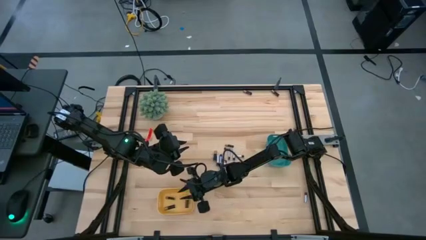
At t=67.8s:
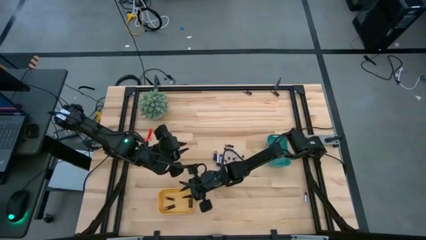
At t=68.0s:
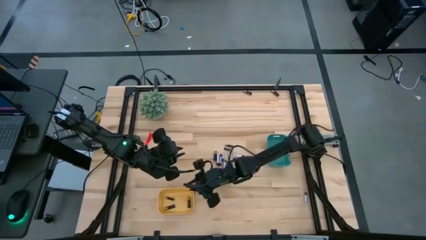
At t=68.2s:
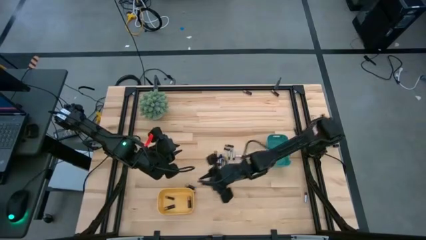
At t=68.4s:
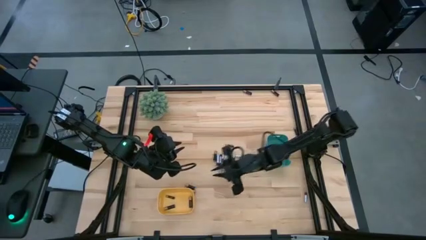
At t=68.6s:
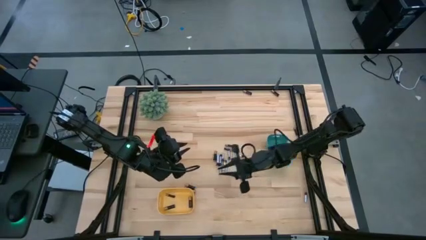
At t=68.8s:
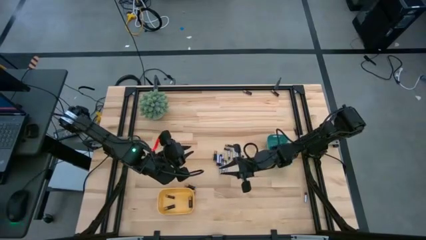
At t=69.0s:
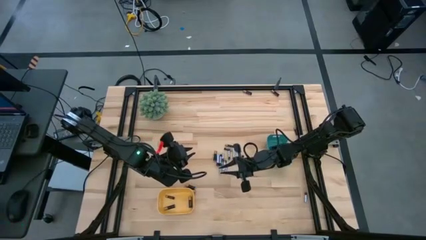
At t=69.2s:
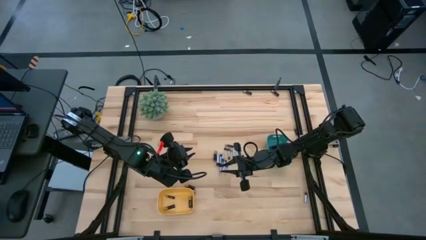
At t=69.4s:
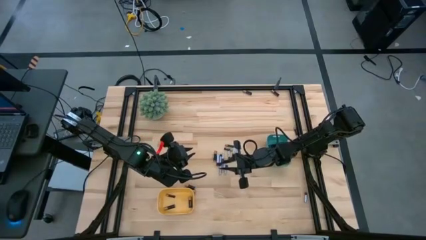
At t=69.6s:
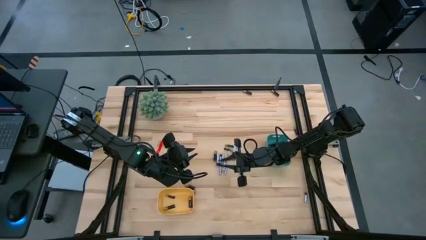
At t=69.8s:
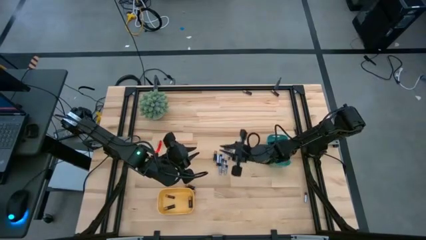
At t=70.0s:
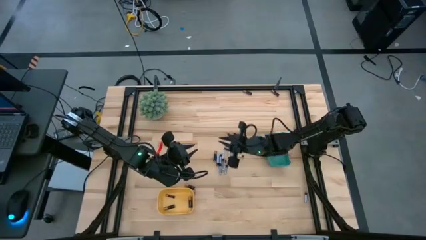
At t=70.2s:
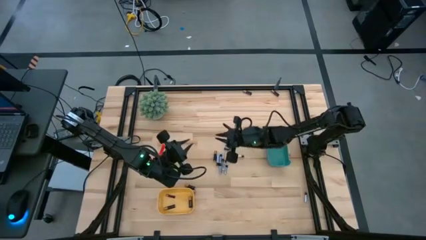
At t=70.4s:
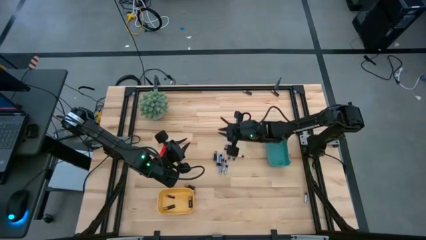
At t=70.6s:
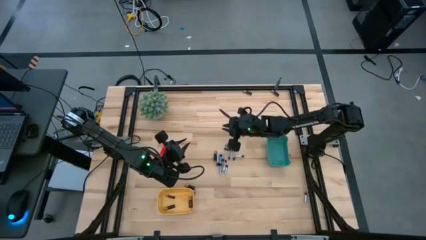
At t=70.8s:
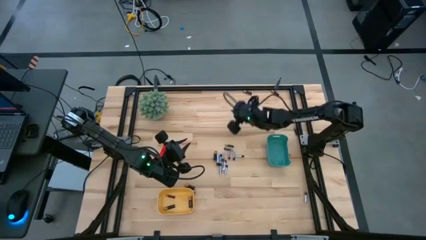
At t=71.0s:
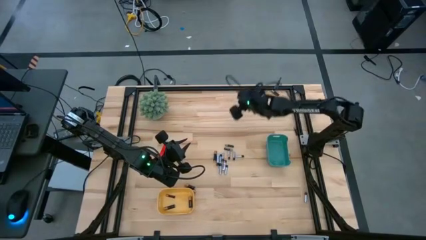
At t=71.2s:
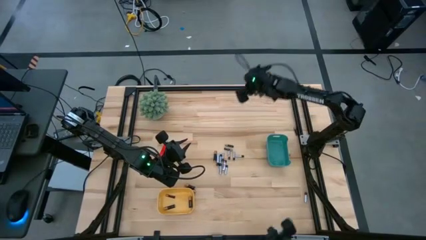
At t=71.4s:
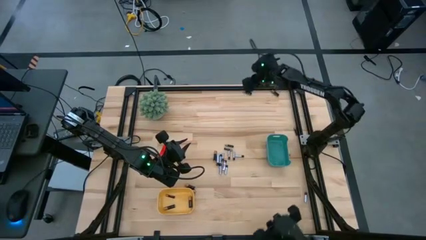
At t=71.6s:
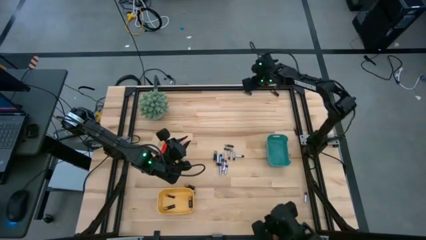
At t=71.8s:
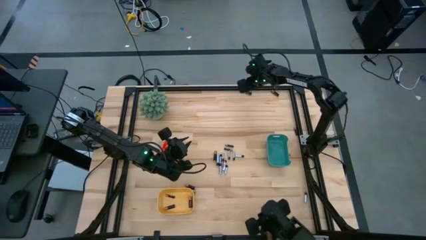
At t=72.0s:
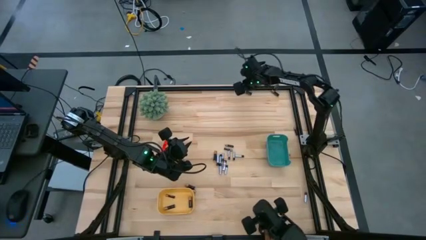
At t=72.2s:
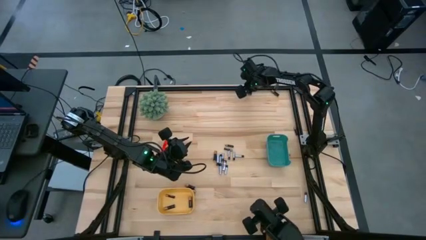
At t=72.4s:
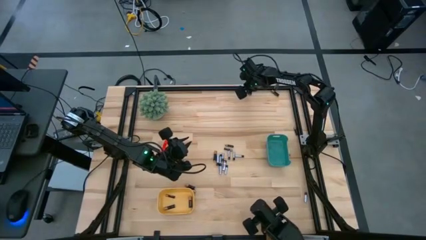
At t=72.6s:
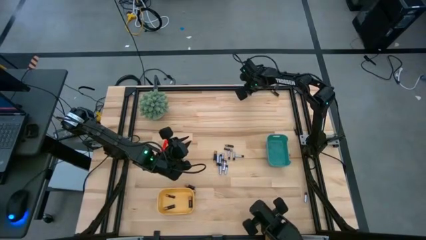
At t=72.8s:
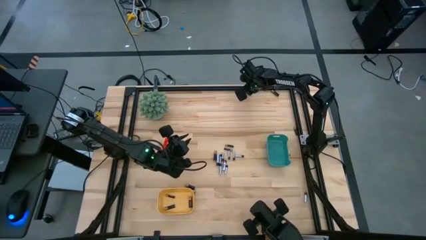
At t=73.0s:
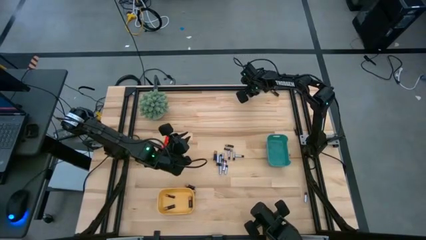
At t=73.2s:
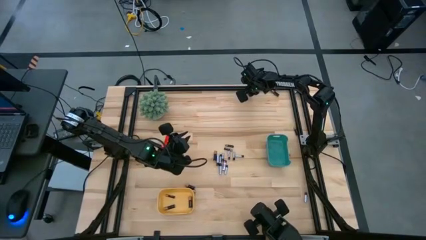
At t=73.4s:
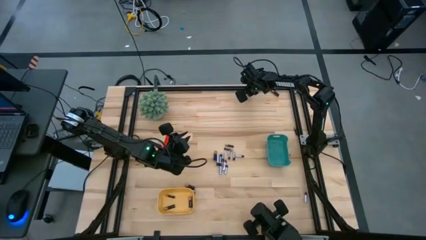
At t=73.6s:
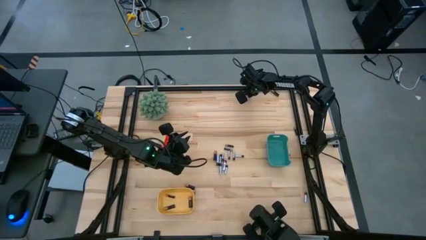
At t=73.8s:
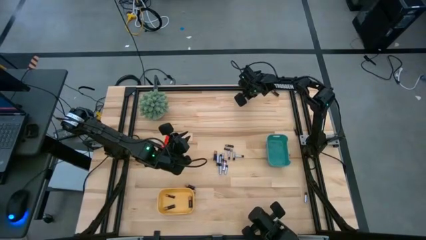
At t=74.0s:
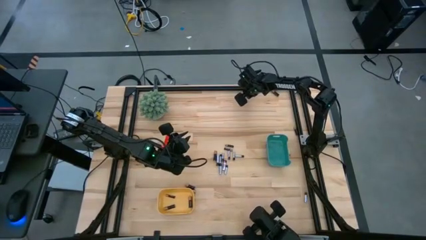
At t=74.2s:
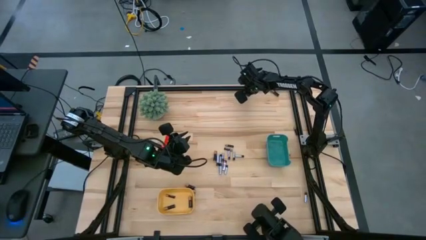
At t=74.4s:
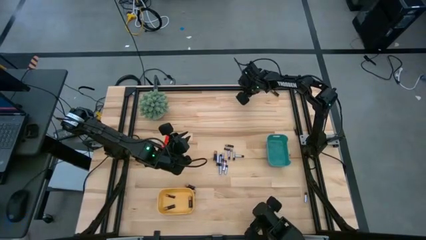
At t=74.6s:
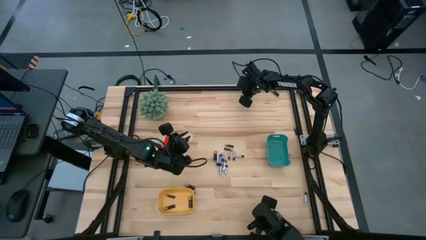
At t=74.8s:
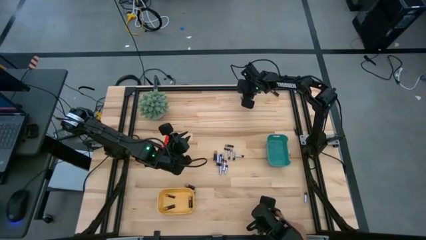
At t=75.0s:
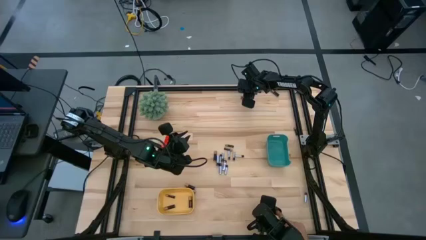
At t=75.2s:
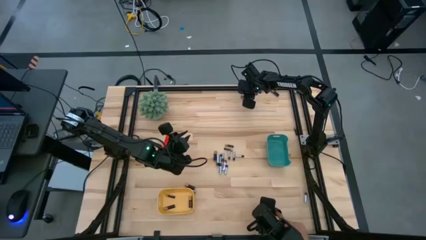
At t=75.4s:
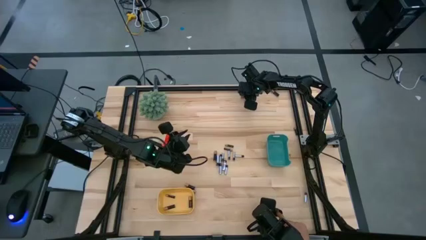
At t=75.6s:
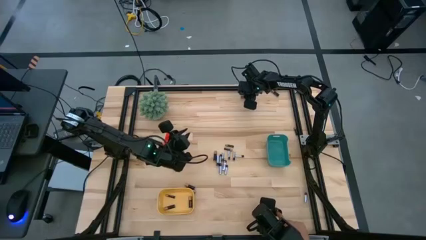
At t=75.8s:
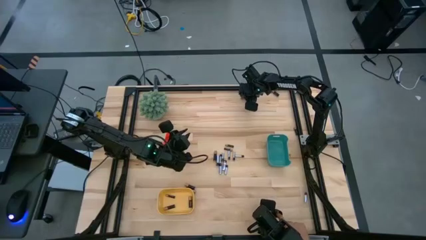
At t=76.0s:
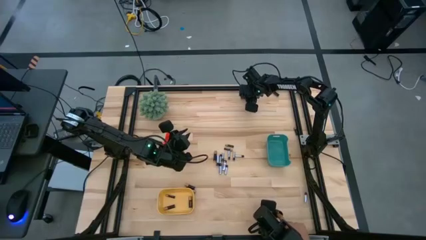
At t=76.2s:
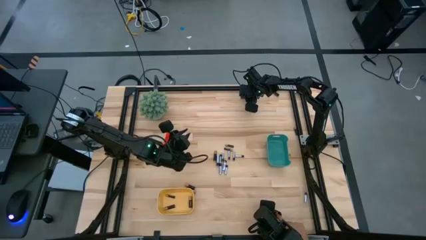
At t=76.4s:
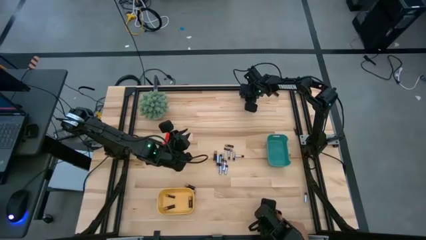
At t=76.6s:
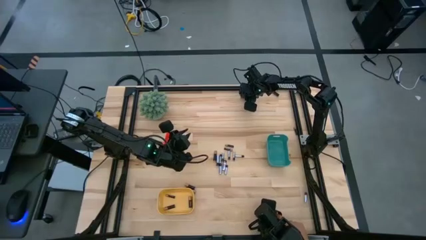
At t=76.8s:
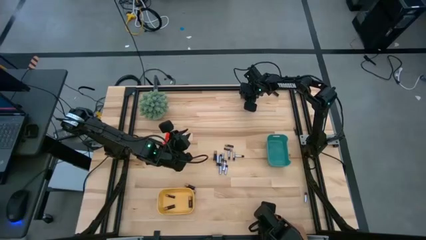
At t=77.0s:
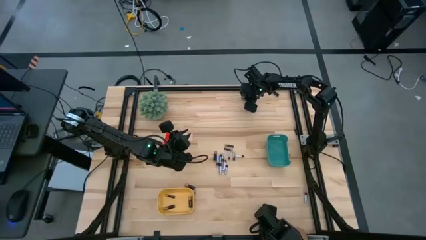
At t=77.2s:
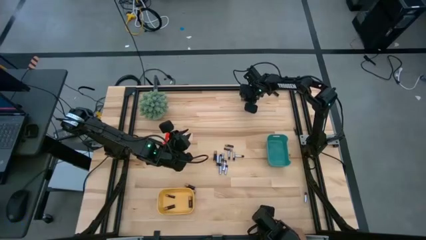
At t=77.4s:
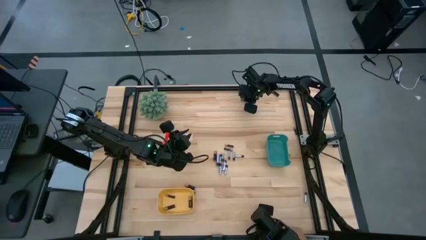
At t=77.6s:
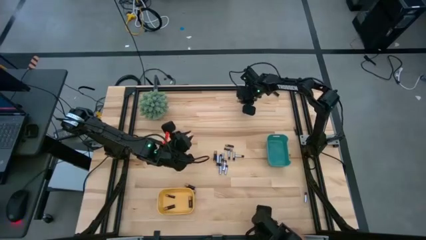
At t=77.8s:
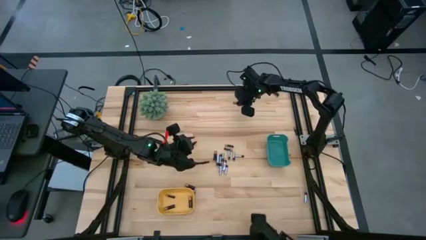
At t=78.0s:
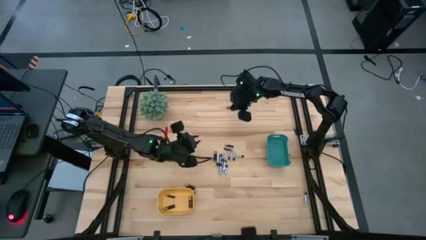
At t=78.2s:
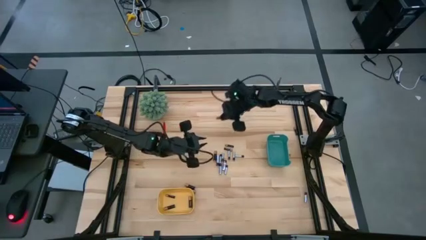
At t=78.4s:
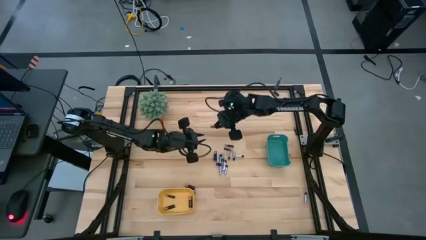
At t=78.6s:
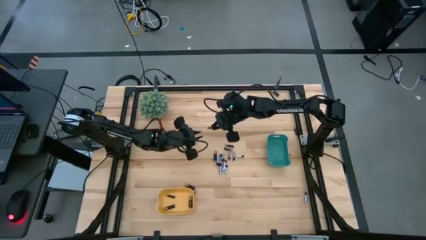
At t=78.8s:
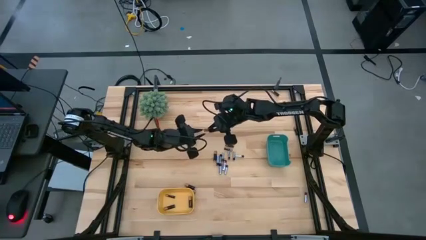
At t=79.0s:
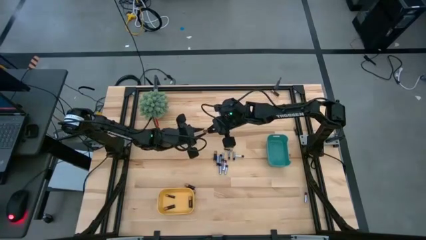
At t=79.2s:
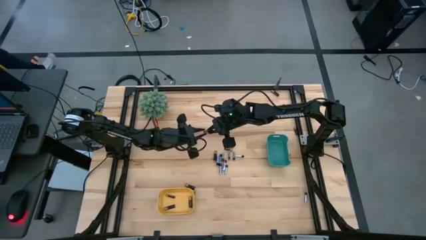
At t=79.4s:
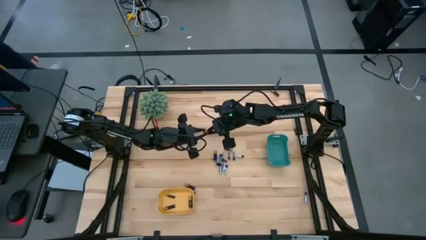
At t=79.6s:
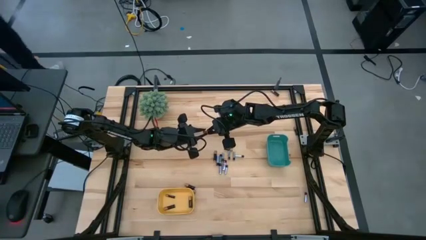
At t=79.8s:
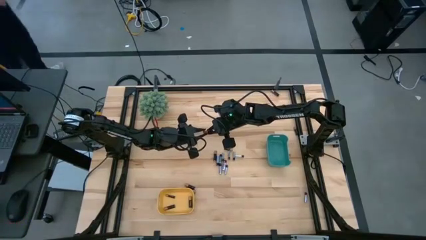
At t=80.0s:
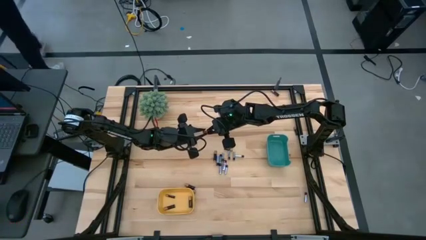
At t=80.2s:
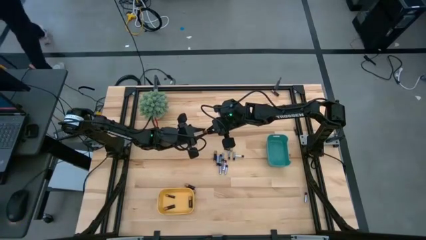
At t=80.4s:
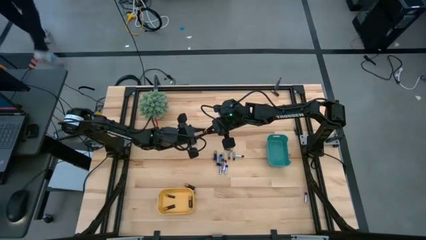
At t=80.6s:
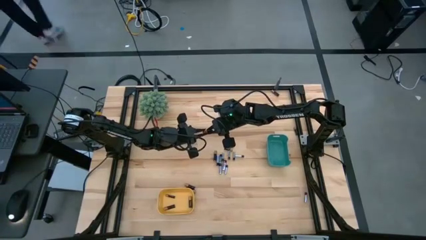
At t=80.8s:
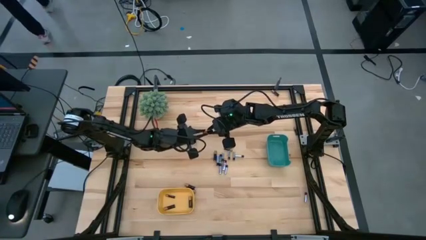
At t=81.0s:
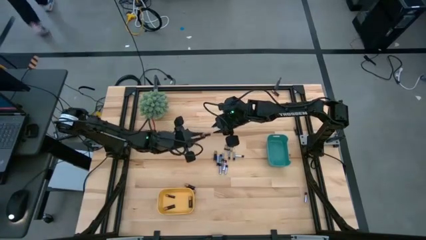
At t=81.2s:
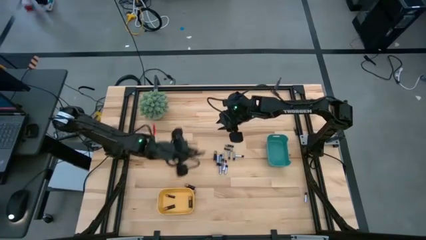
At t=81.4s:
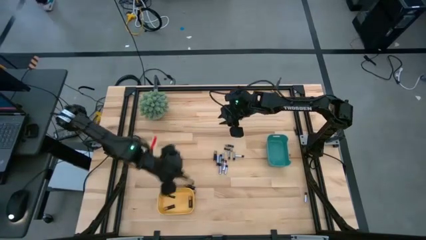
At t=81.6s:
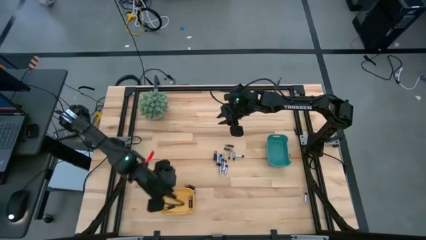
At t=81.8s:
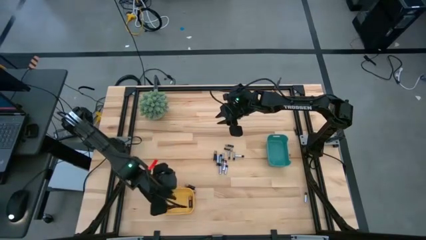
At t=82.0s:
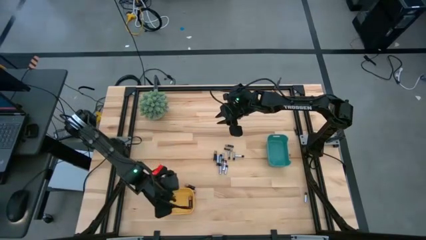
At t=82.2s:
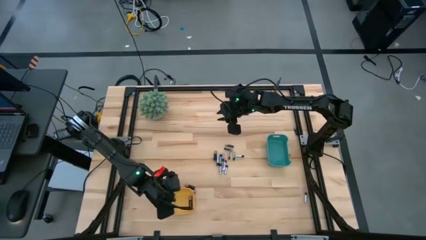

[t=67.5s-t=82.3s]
Task: Sort batteries
Put the black battery into the yellow bin
